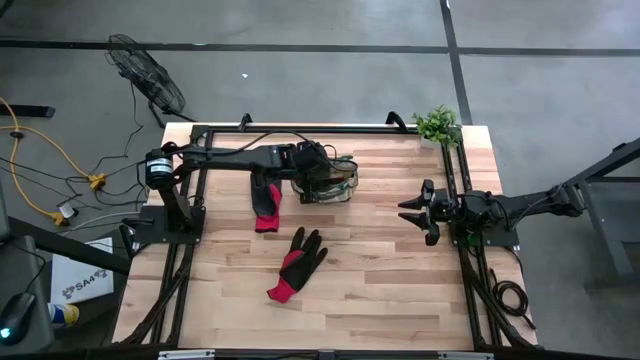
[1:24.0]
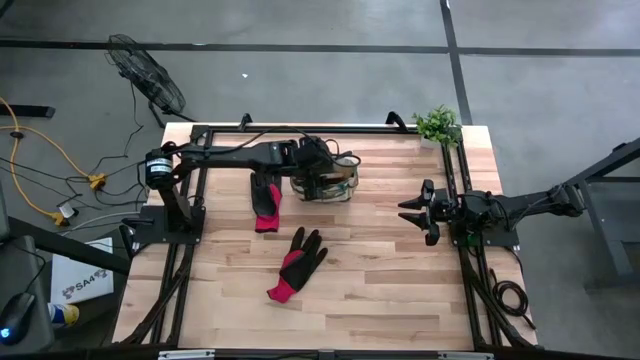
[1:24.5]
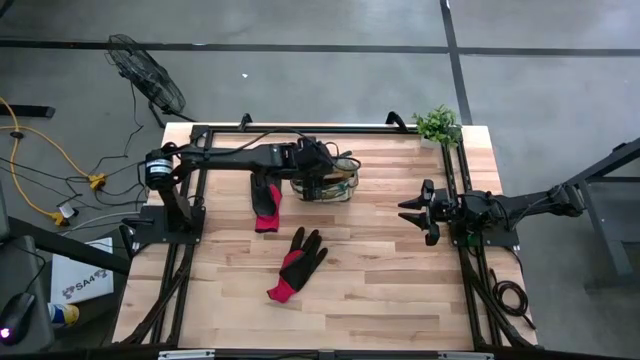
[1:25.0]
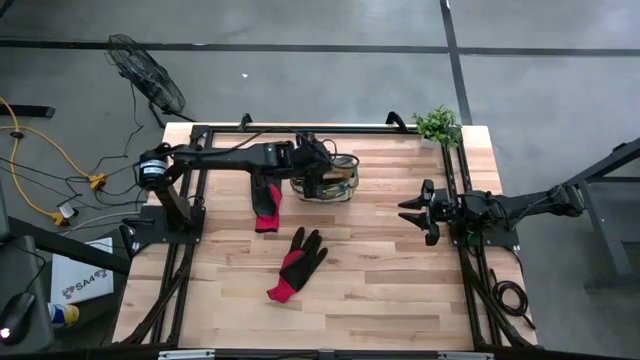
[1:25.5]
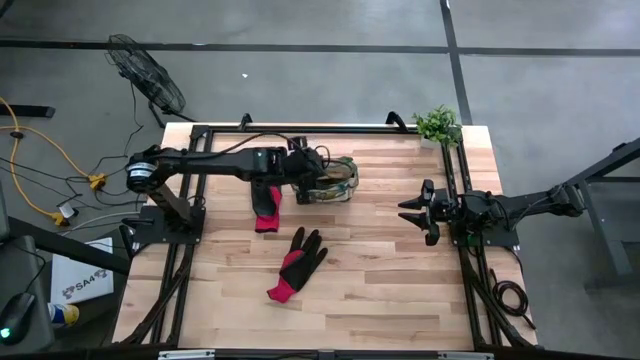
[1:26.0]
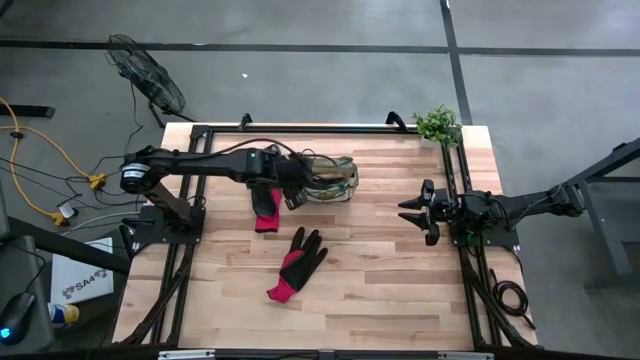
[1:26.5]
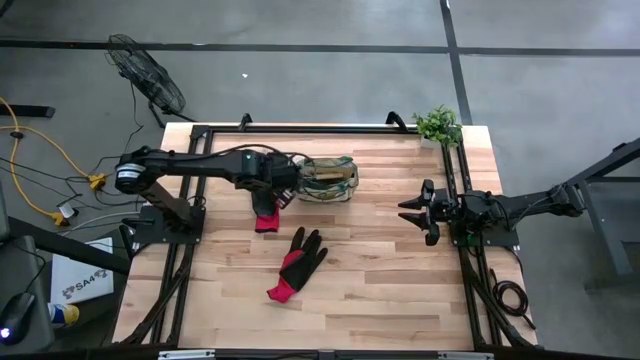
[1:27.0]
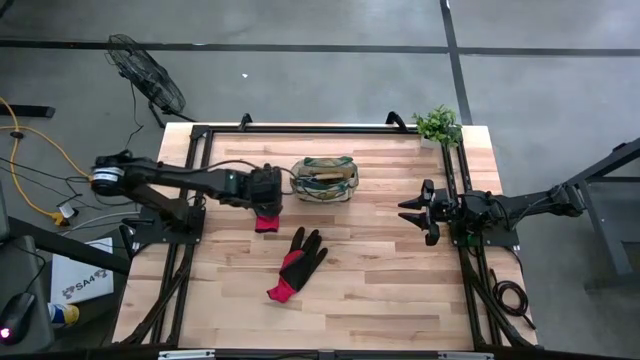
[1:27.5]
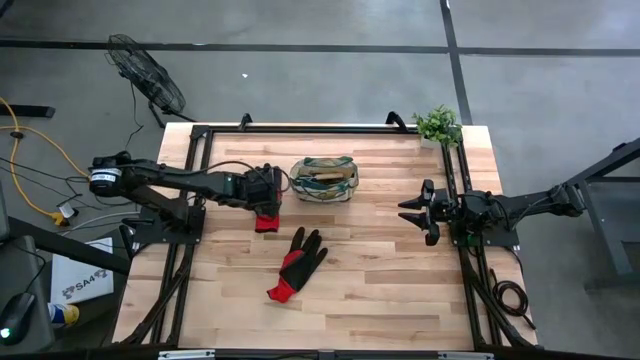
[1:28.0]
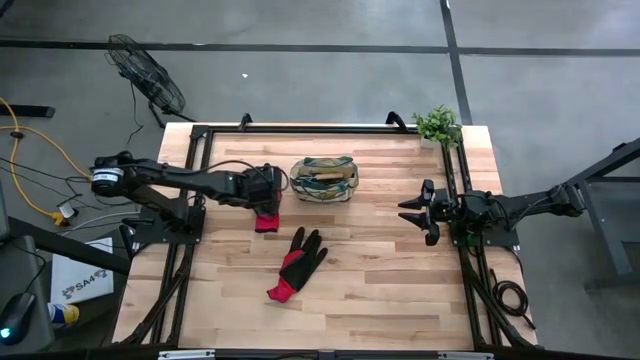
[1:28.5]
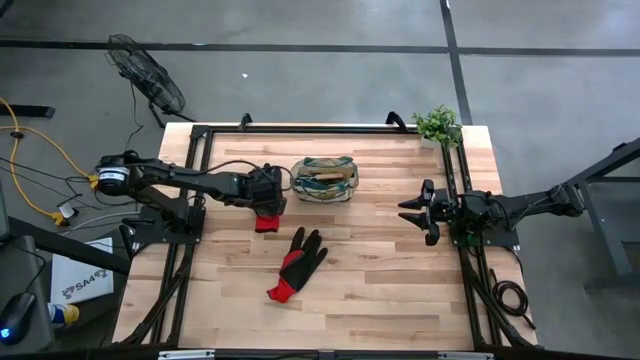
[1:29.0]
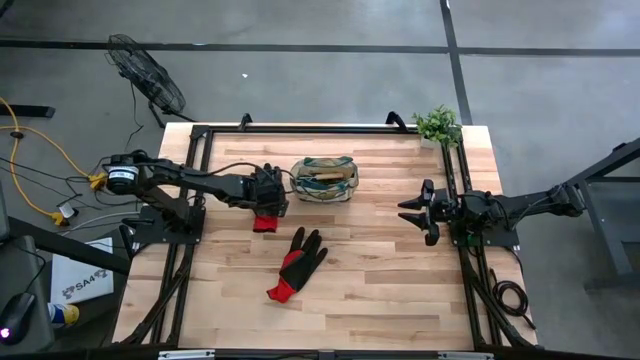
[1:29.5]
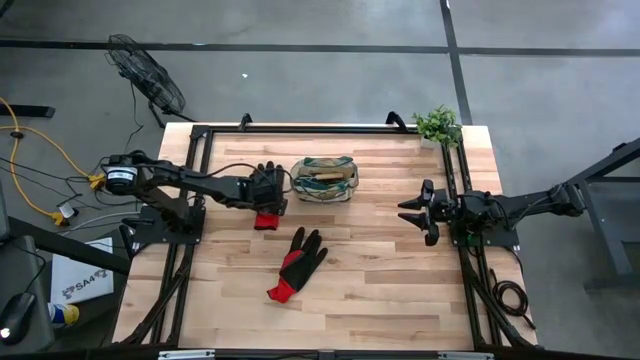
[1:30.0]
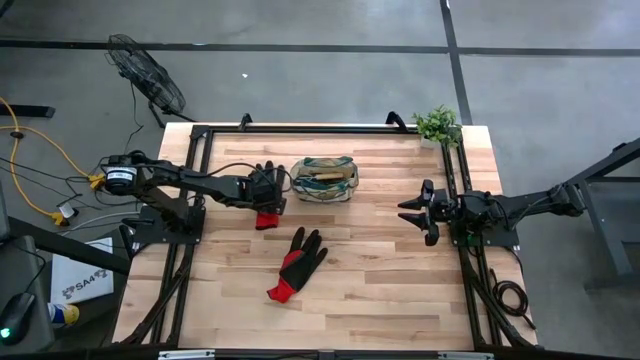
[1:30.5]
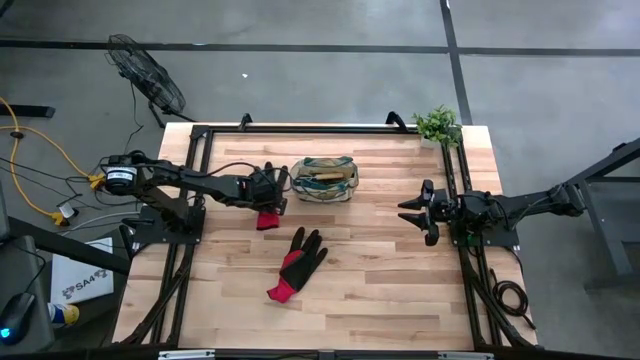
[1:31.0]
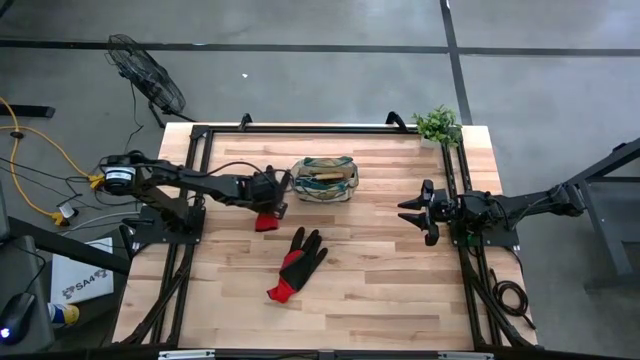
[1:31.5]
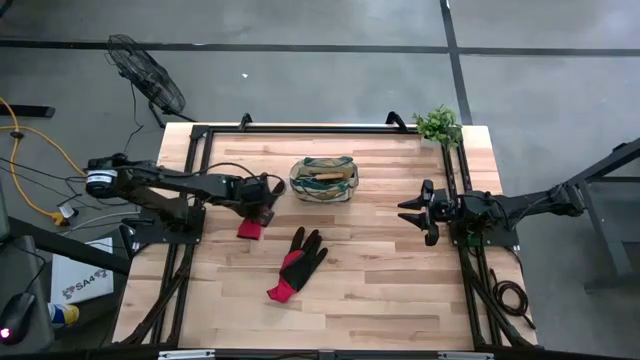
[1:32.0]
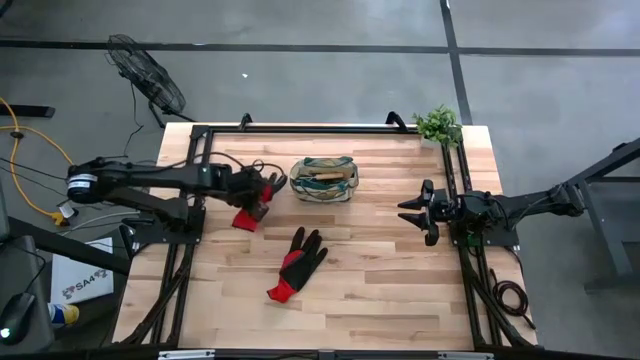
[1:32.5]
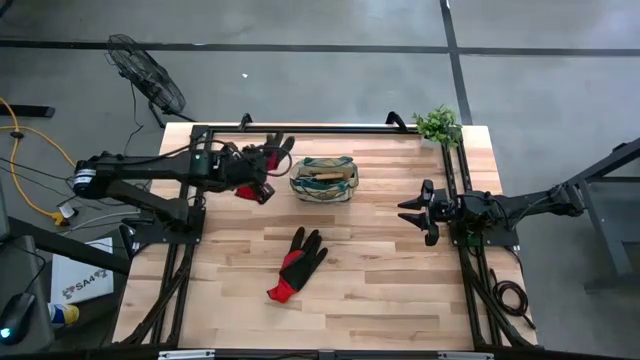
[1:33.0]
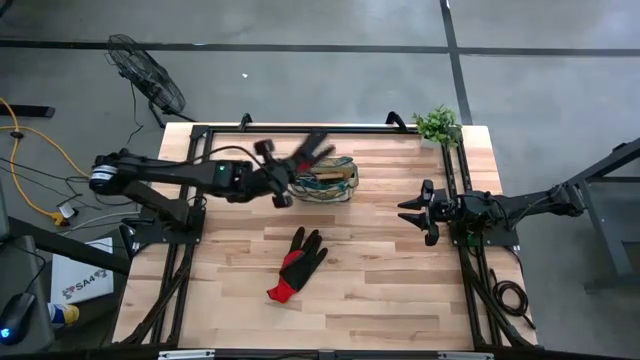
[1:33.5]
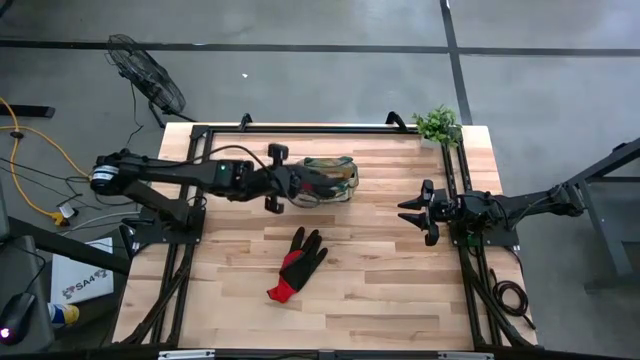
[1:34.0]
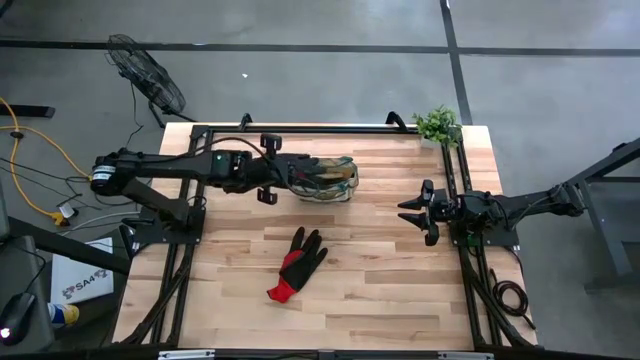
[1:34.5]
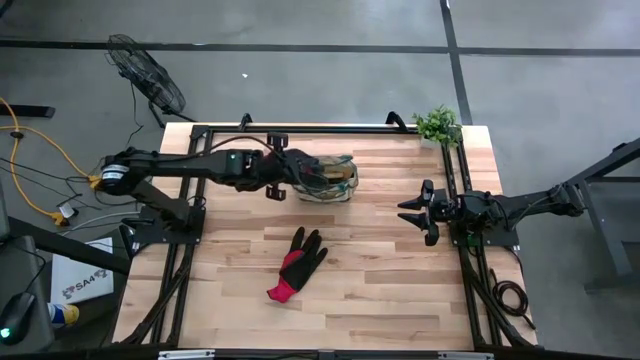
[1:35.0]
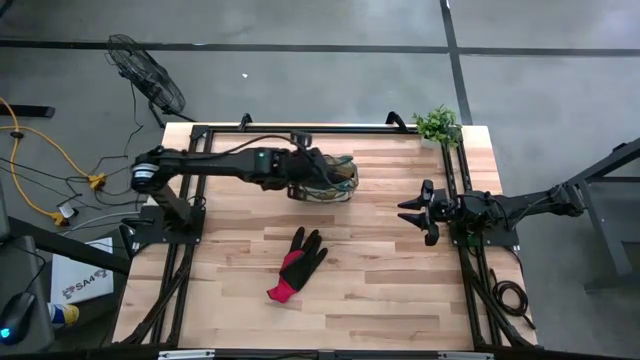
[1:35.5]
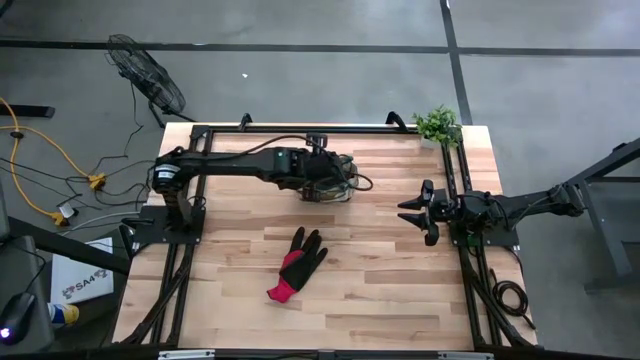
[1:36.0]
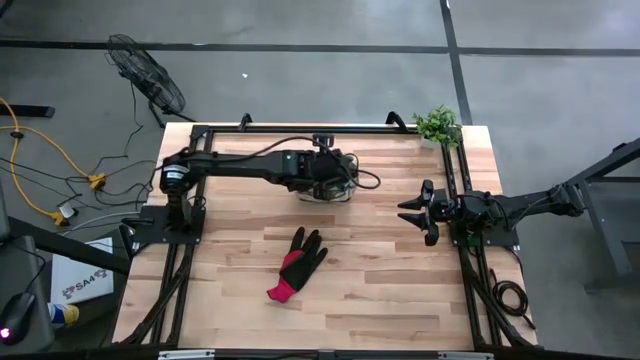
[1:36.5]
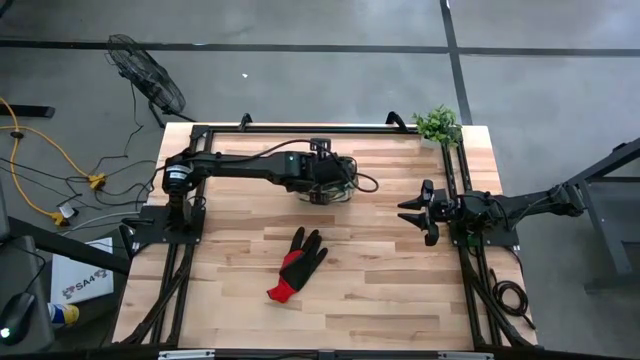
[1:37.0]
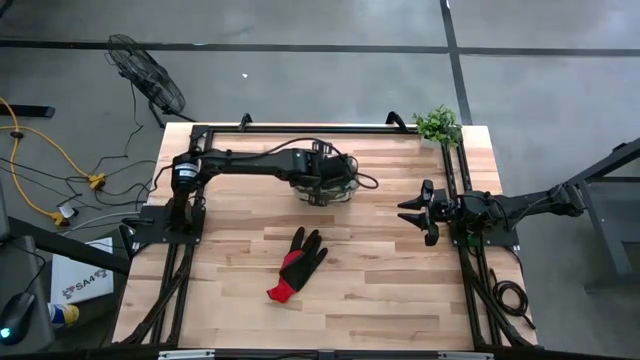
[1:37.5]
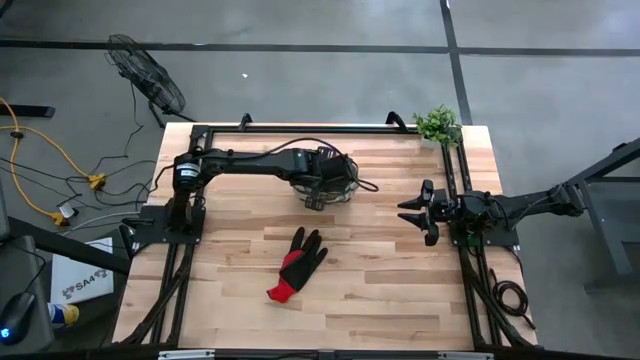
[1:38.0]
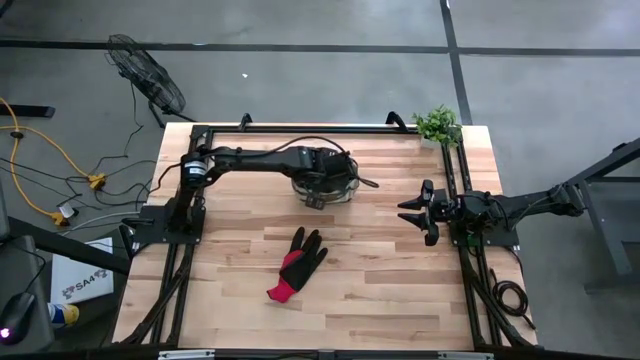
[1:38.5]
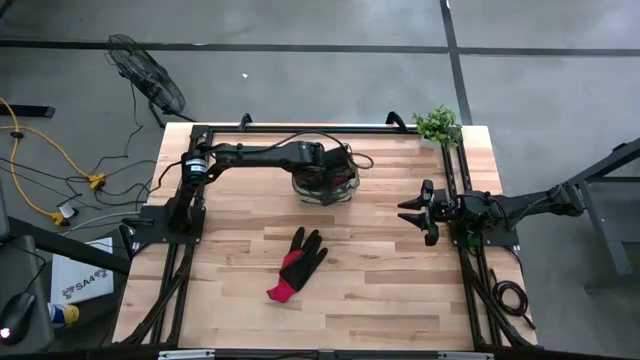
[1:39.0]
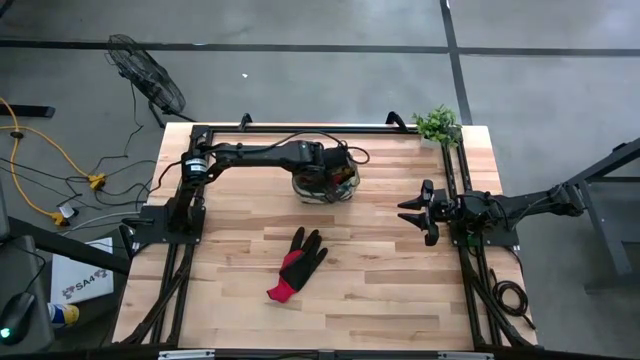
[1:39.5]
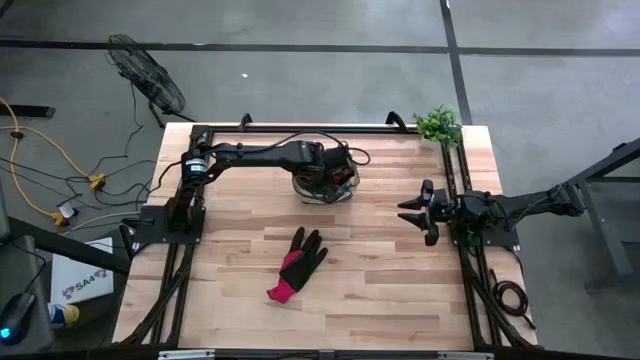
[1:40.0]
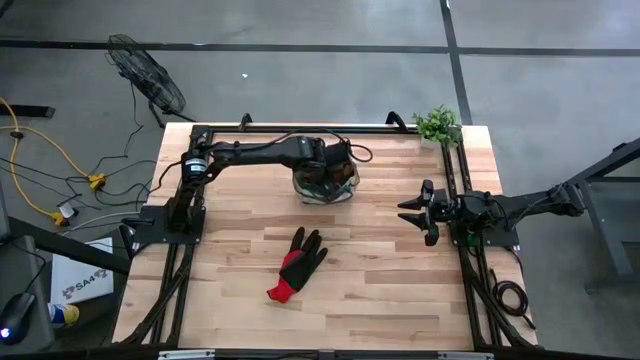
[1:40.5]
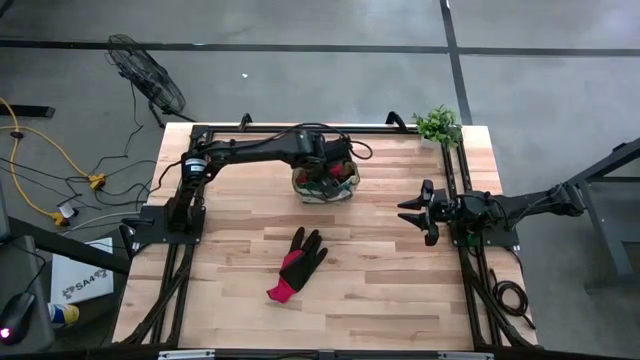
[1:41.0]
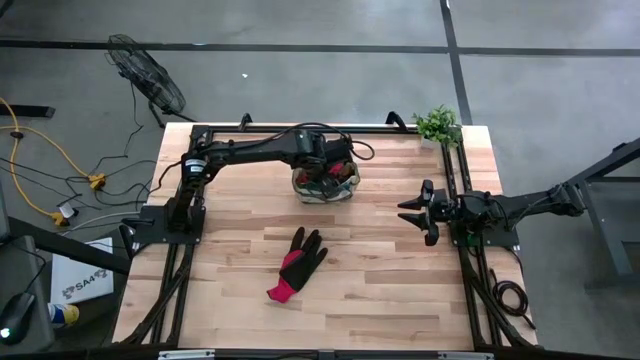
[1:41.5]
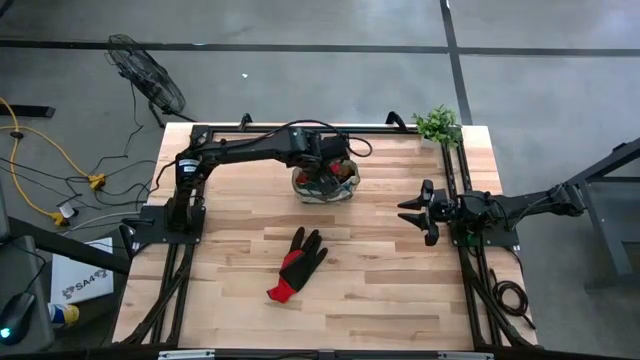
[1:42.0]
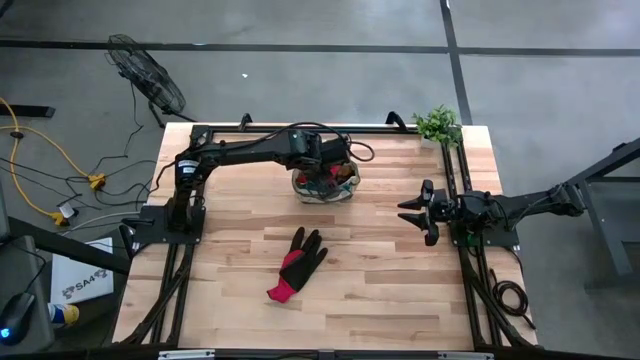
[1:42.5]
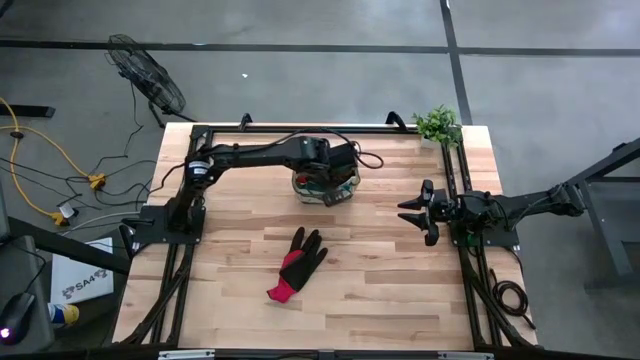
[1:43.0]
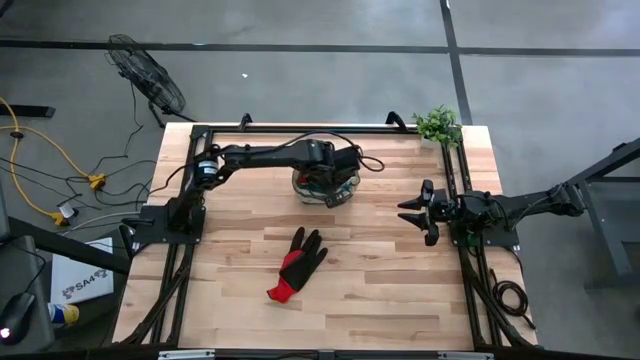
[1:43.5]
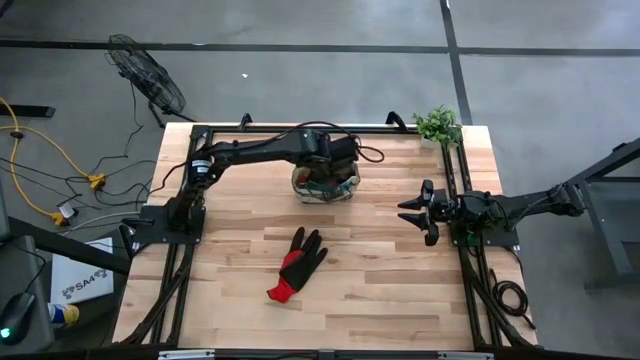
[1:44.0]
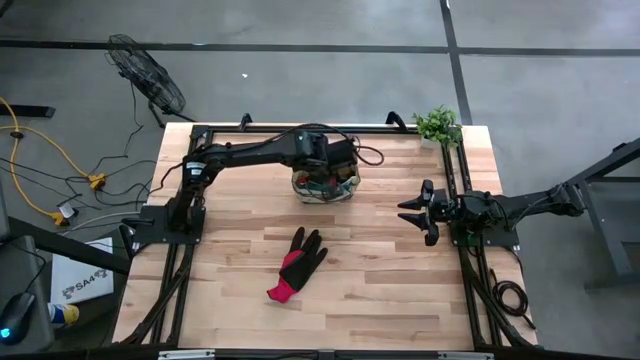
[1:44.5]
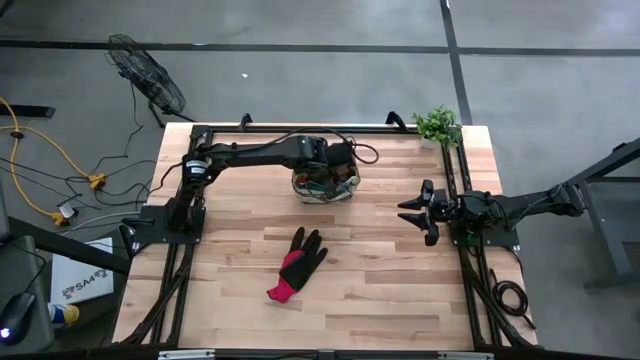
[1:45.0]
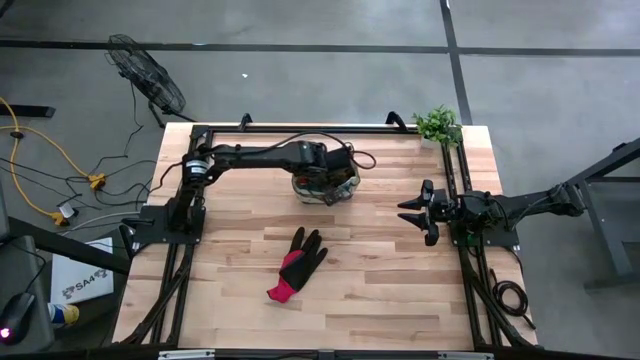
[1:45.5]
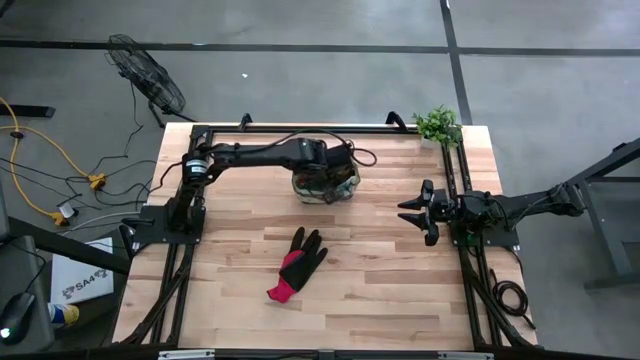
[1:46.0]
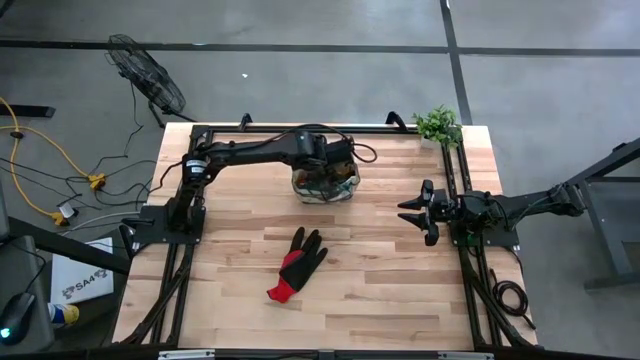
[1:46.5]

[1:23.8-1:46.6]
Task: Pick & Place Garden tools in Gardening bag
Put the top red glove into the gardening bag
